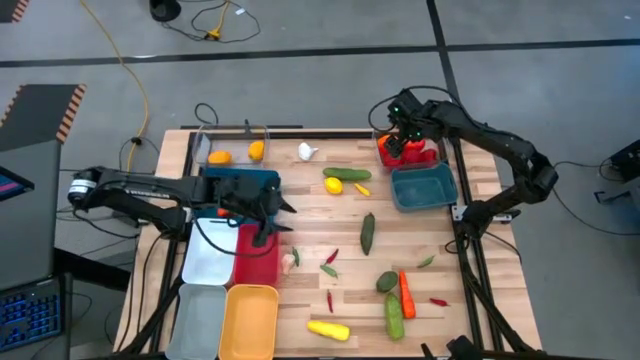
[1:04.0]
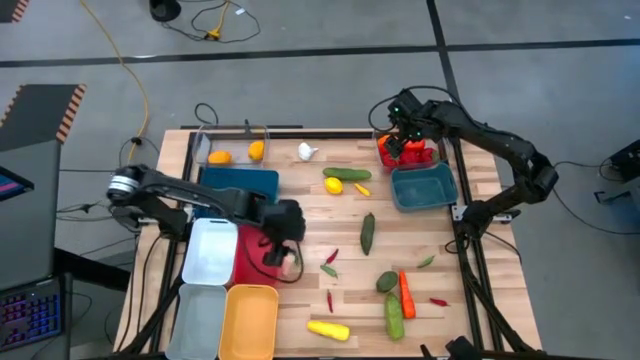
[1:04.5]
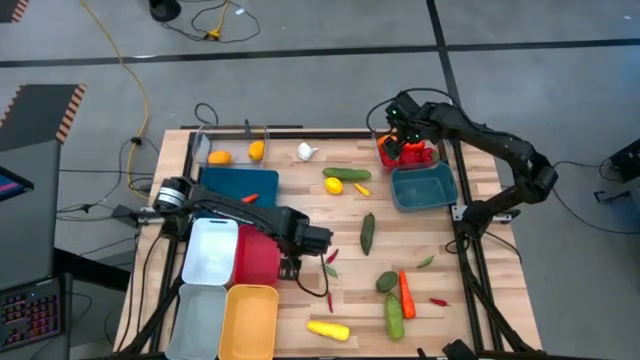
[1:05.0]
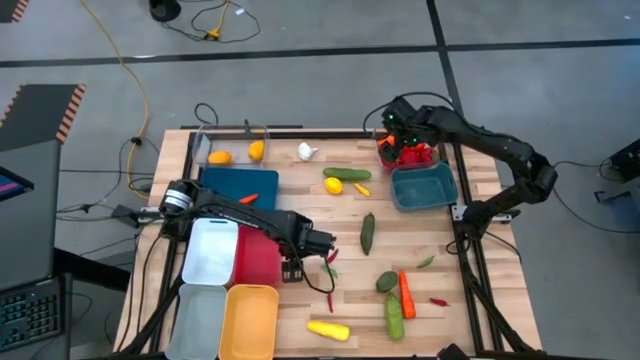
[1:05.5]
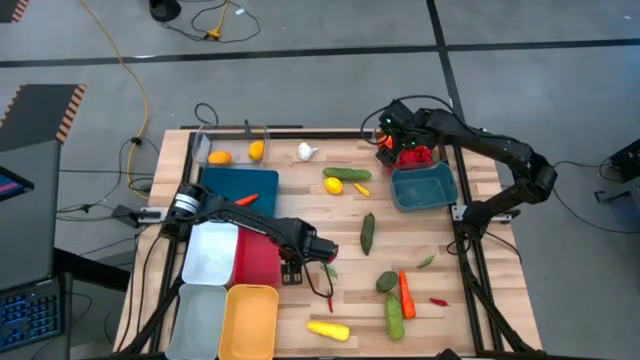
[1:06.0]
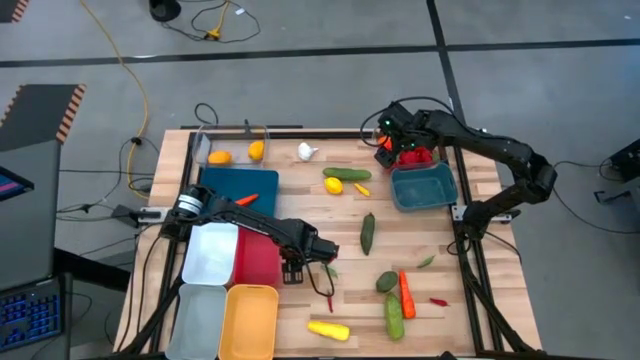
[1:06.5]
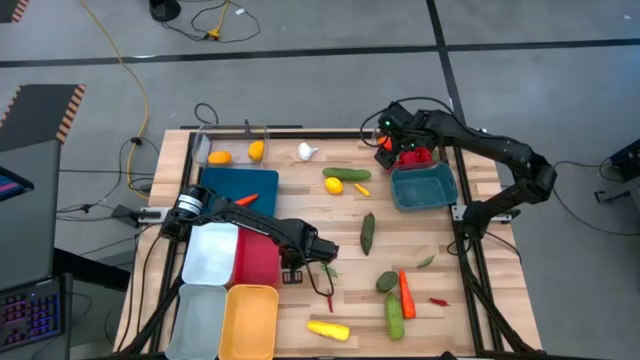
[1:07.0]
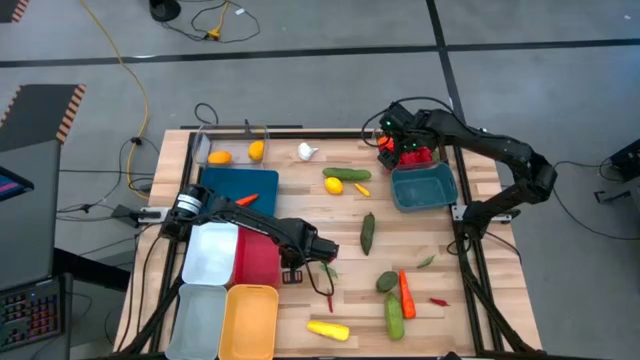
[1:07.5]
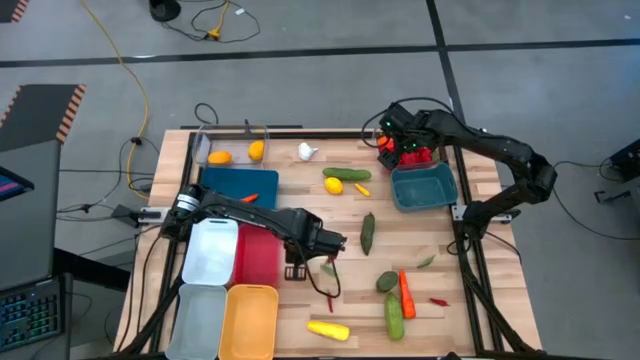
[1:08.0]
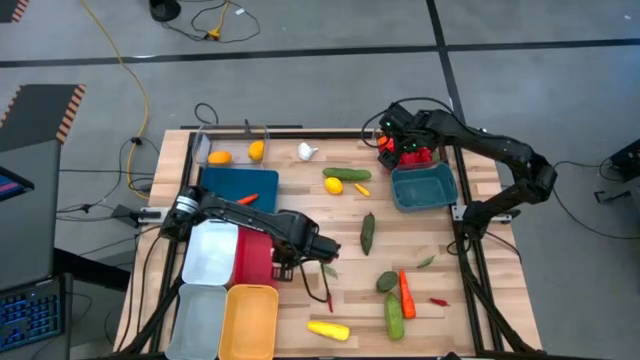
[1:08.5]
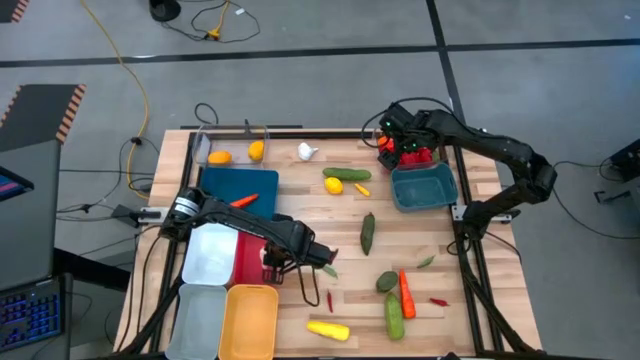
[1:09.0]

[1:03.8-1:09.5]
Task: Sort produce into baskets
Put the bottom white garlic into the red bin

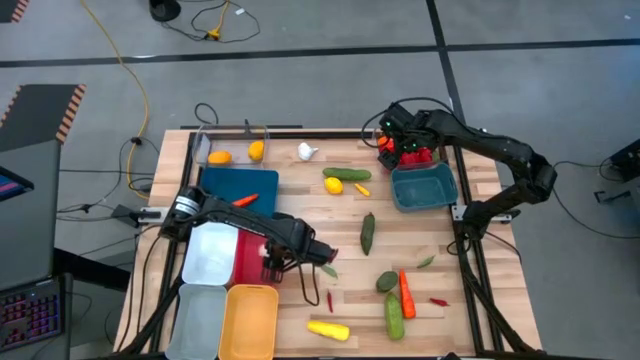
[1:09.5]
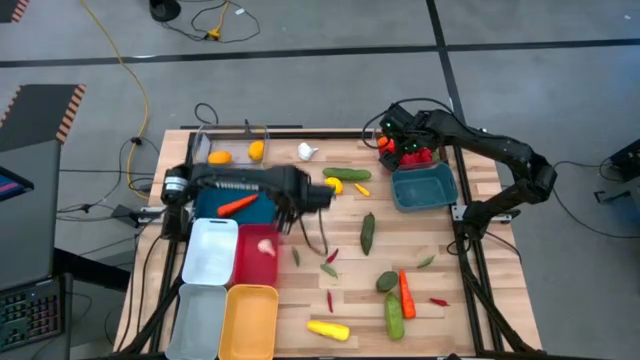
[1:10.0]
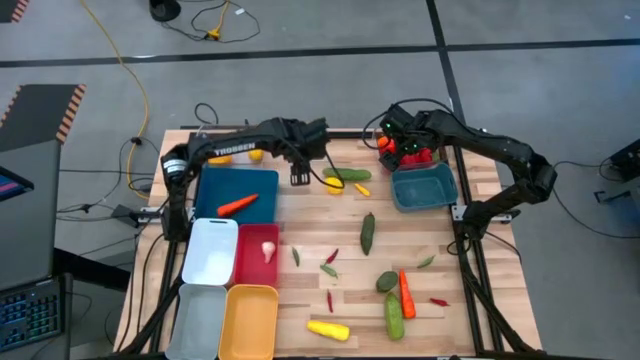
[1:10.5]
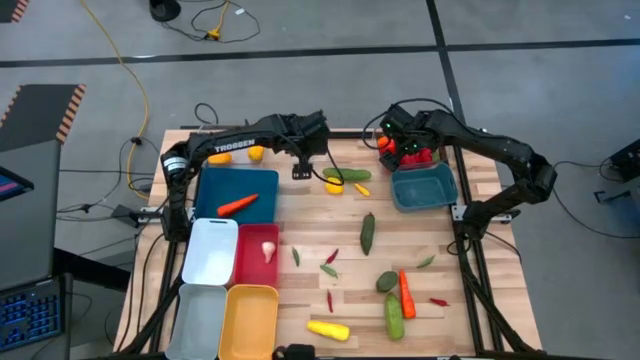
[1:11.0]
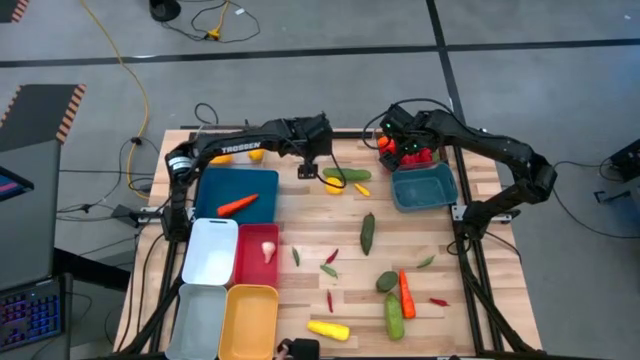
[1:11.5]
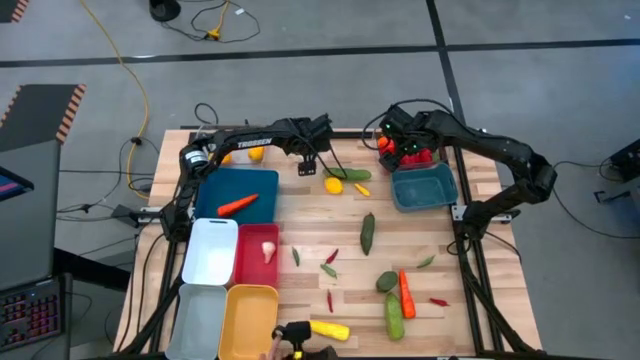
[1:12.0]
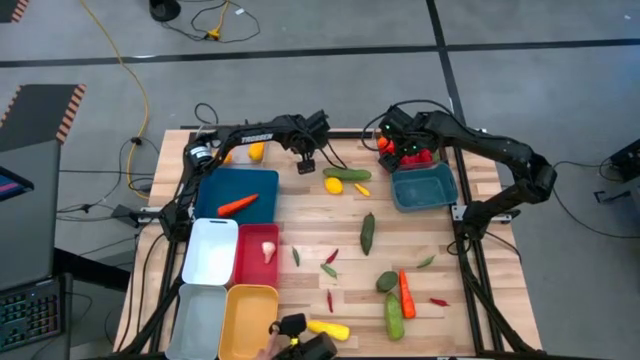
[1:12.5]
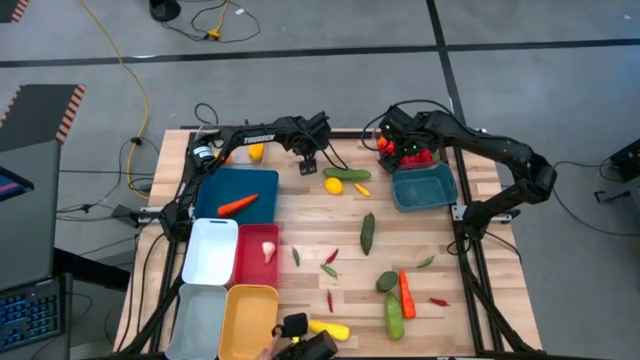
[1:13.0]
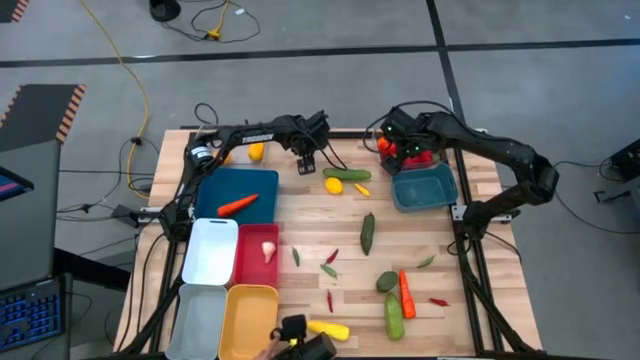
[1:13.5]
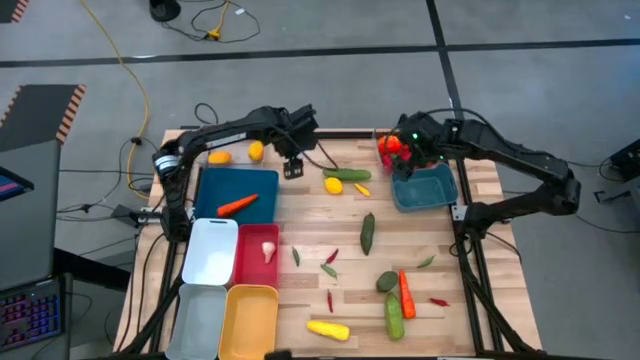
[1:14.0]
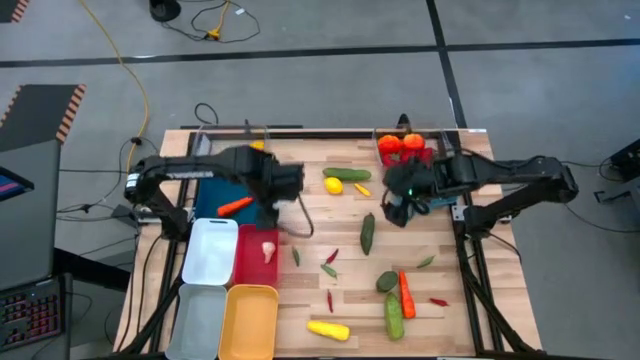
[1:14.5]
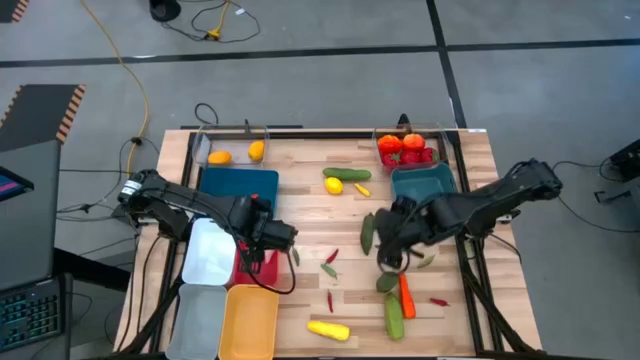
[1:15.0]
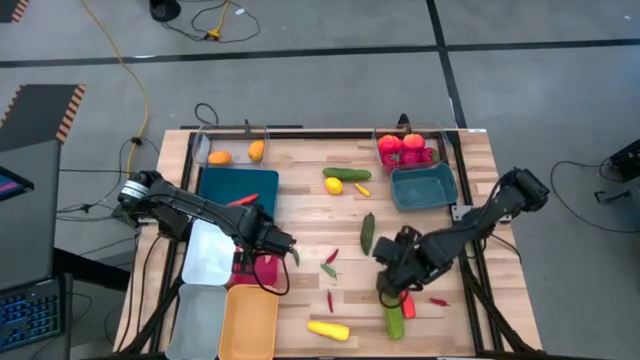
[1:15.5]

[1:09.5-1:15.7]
Put the white garlic into the red bin

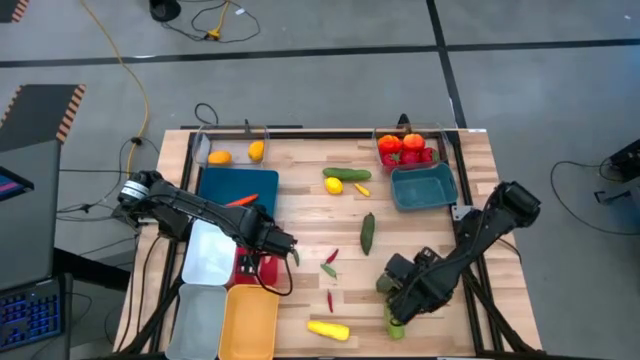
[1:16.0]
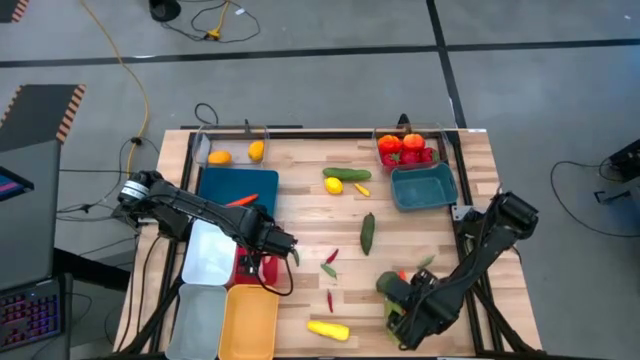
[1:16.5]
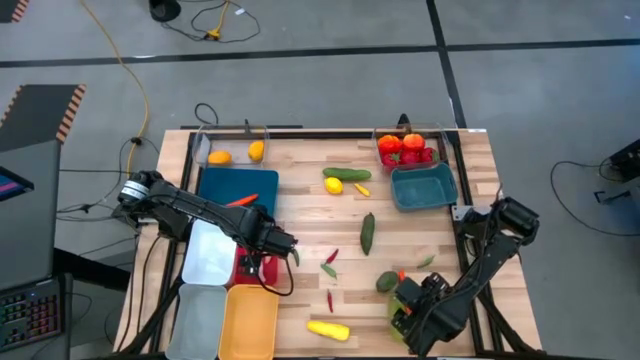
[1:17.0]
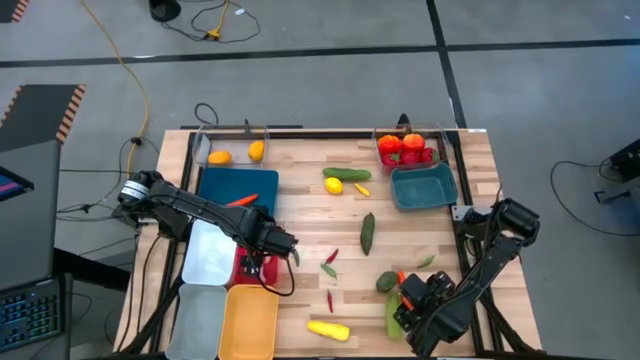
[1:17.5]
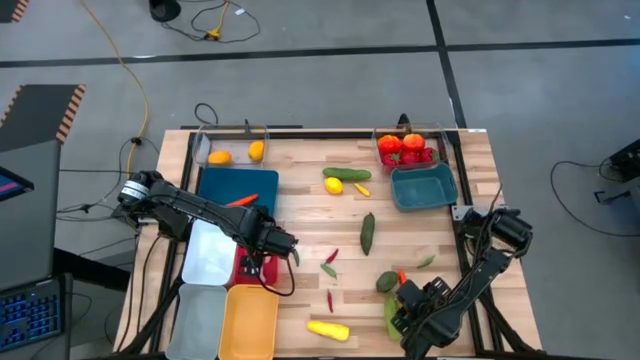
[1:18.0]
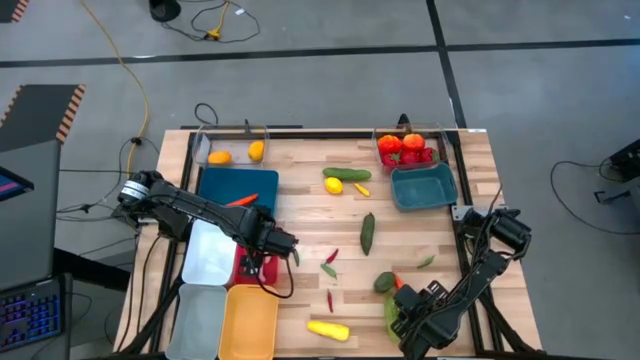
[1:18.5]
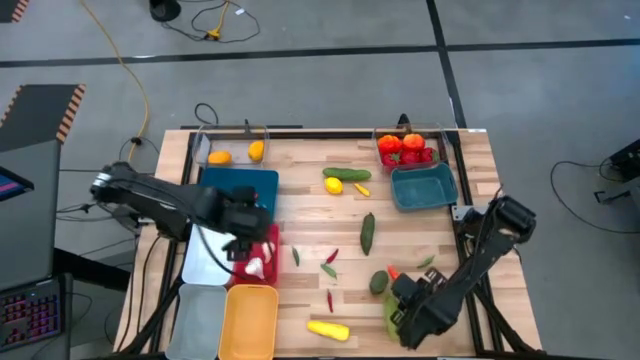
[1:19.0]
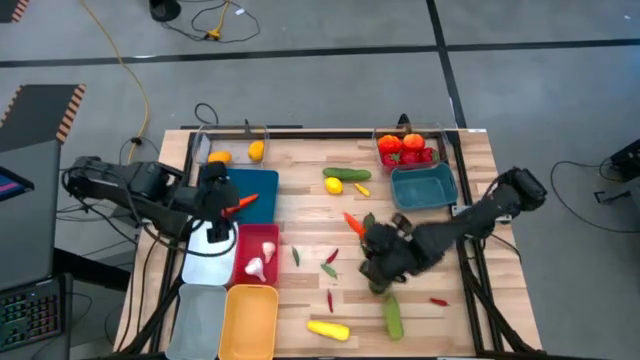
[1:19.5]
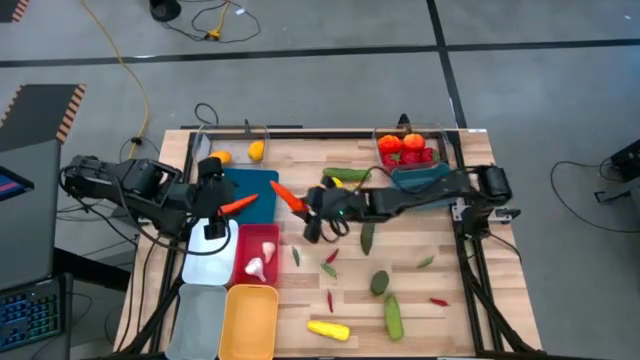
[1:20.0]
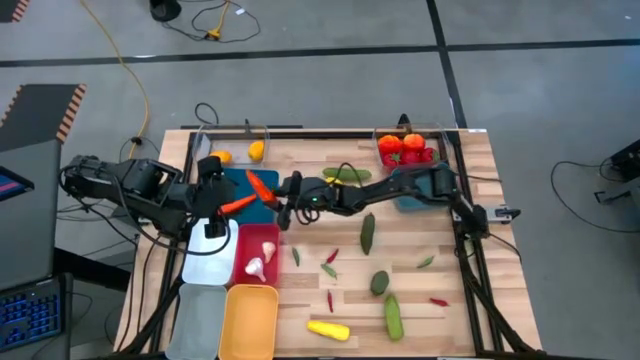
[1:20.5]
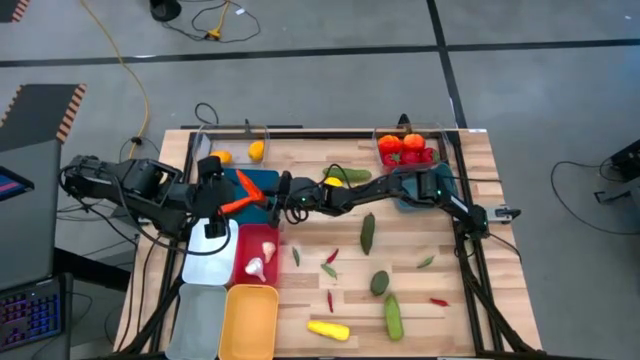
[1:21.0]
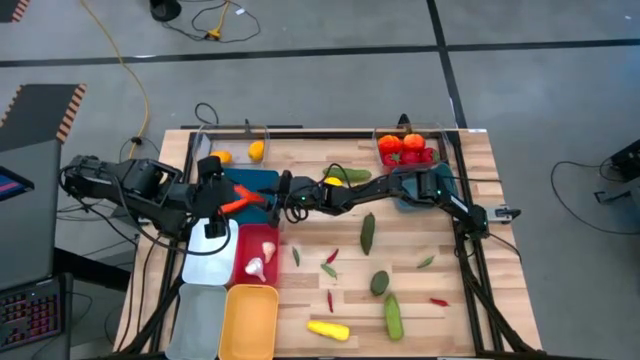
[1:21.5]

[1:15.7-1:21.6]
Put the orange carrot into the blue bin

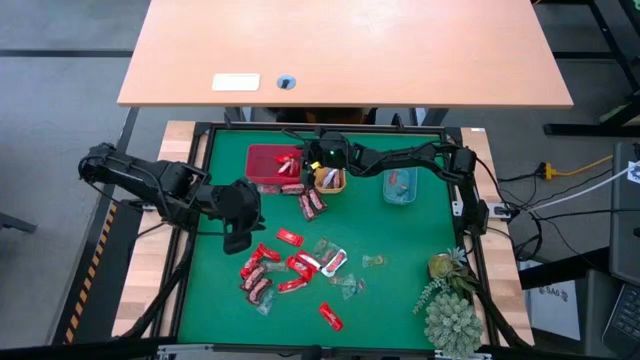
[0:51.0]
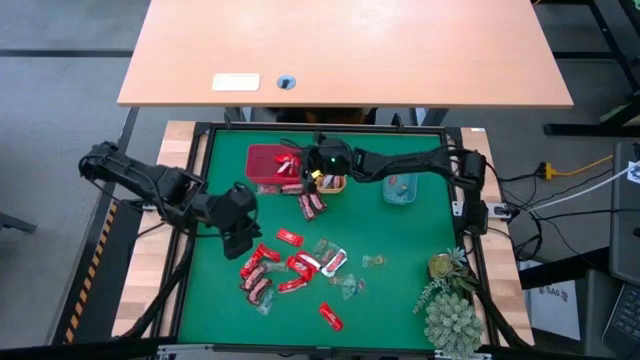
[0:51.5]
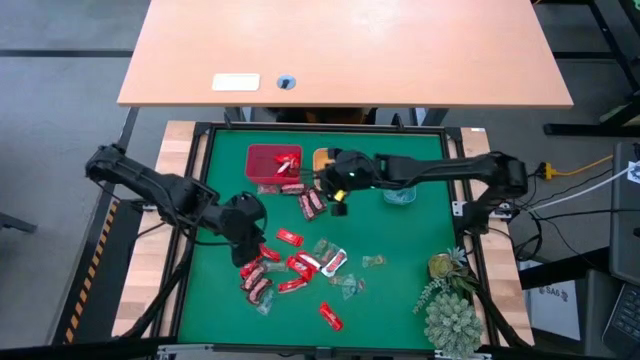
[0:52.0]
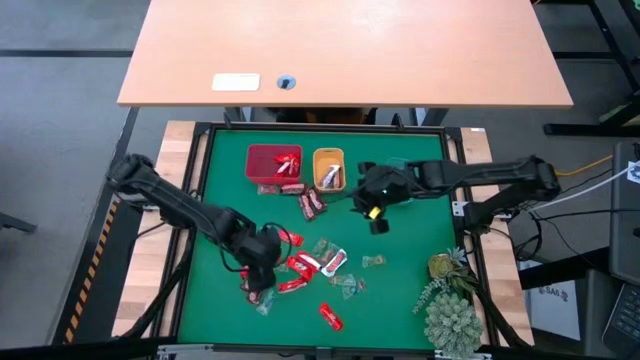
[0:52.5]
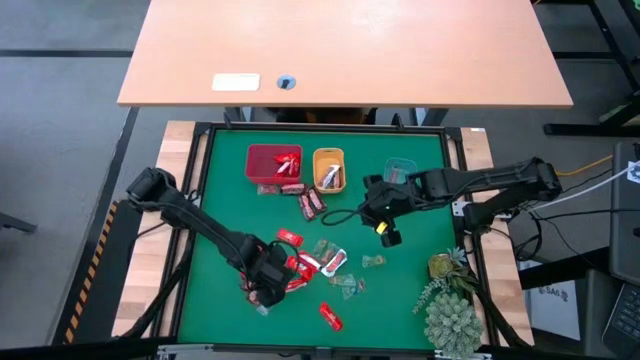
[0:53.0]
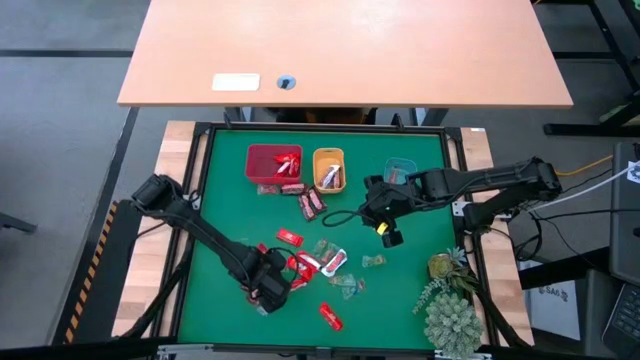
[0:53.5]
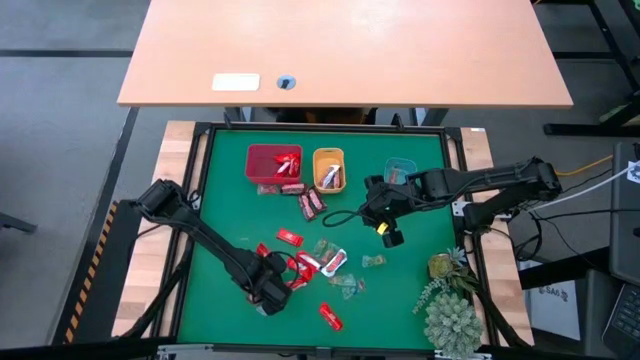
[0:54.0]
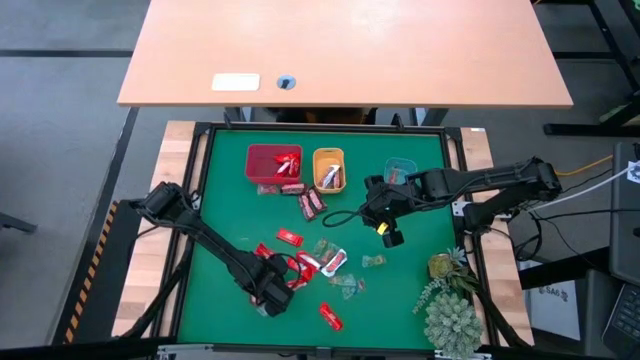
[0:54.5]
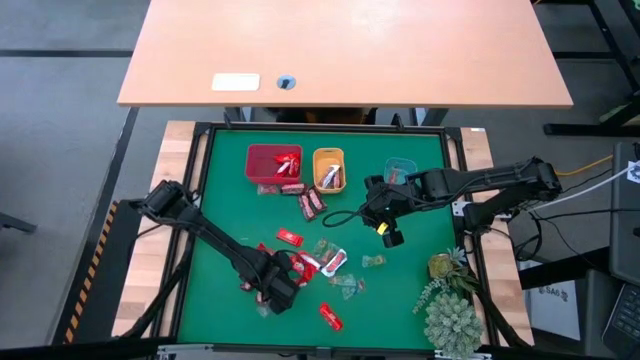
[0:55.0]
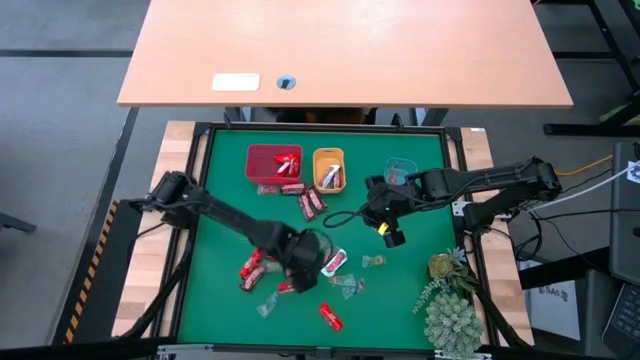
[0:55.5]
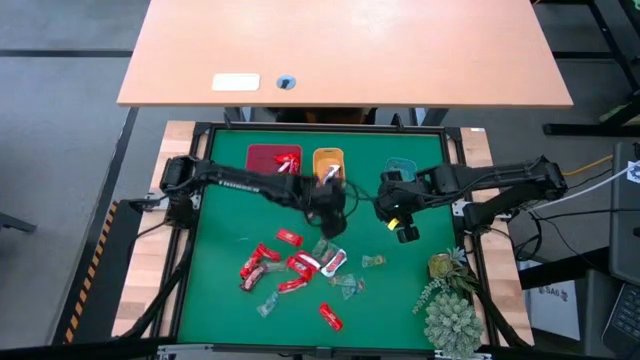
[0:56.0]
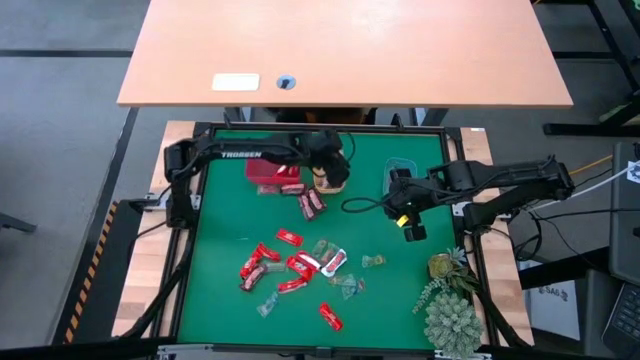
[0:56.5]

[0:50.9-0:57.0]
Task: Sort candy
Put the brown chocolate bar into the yellow bin
